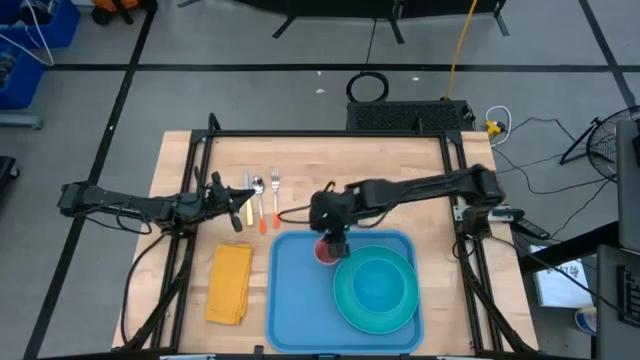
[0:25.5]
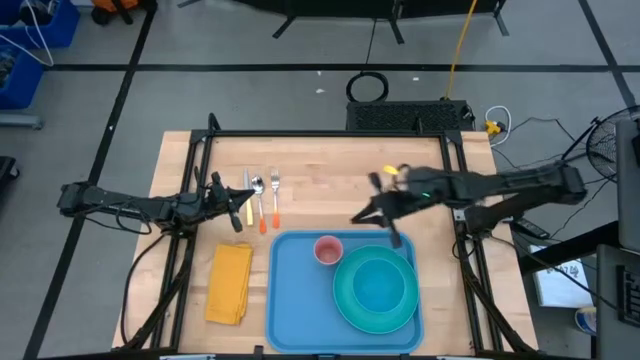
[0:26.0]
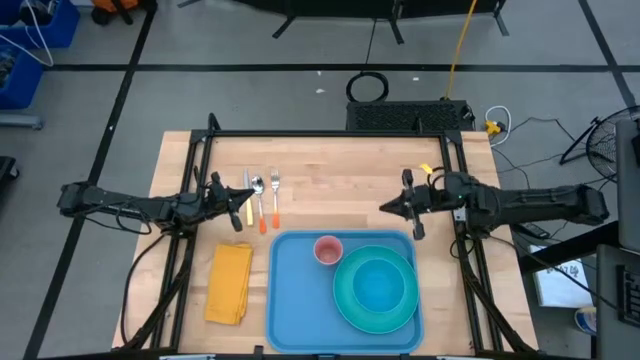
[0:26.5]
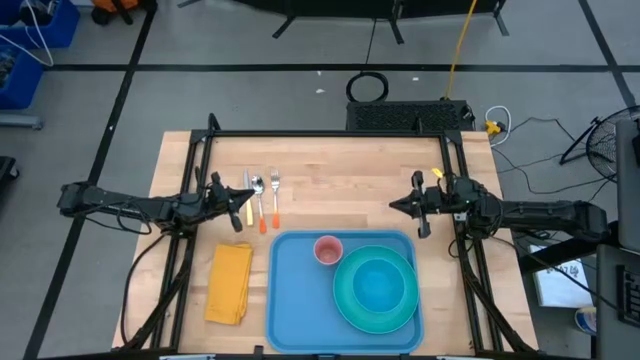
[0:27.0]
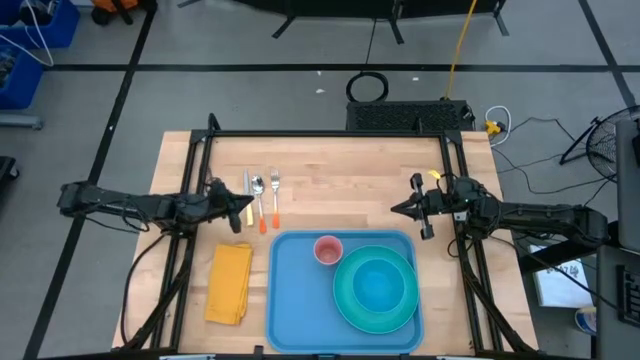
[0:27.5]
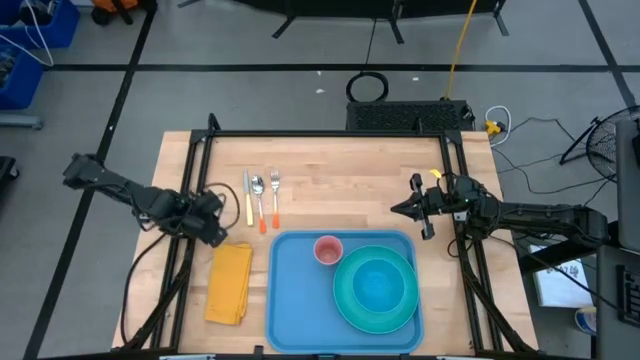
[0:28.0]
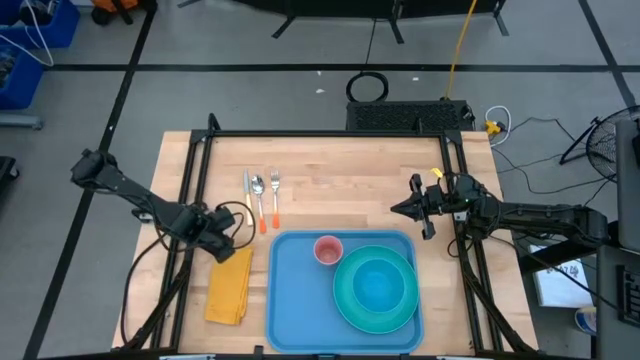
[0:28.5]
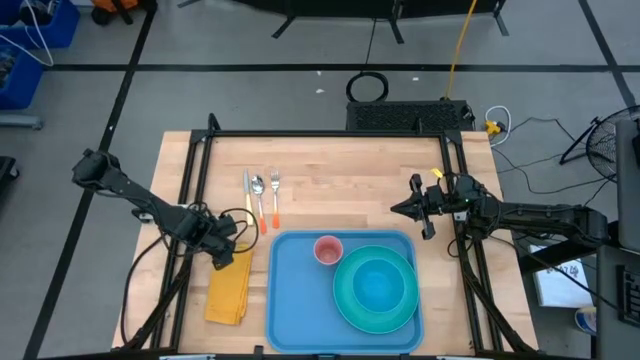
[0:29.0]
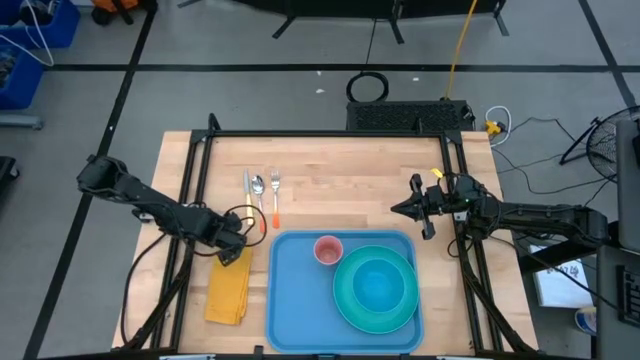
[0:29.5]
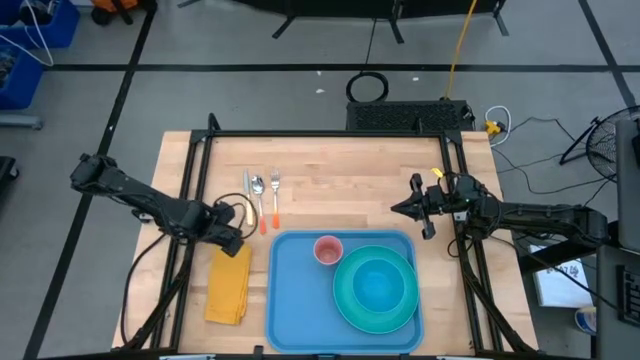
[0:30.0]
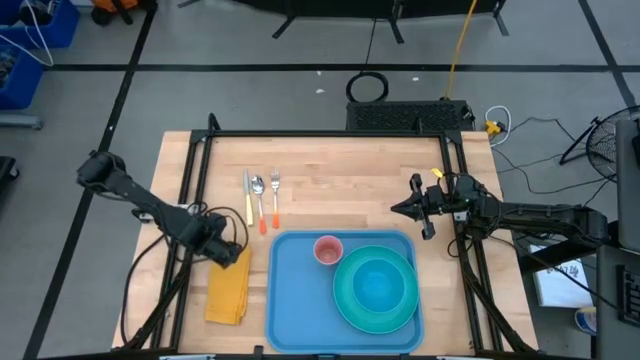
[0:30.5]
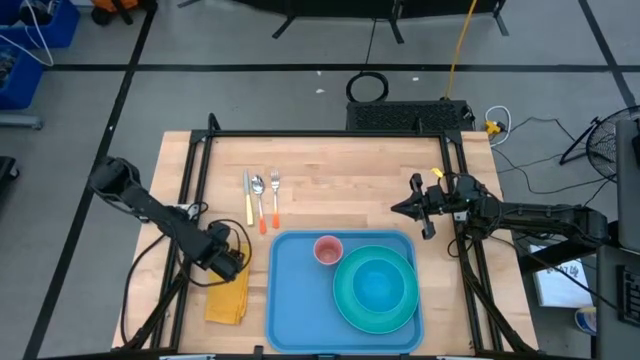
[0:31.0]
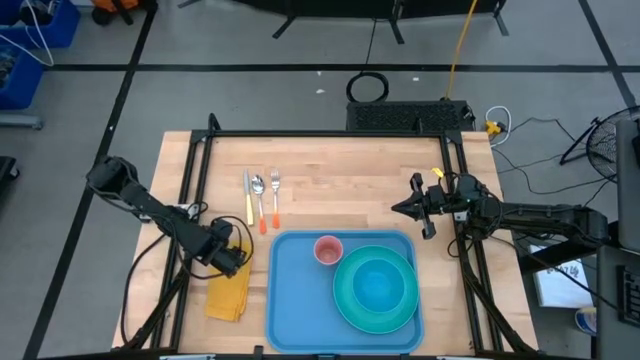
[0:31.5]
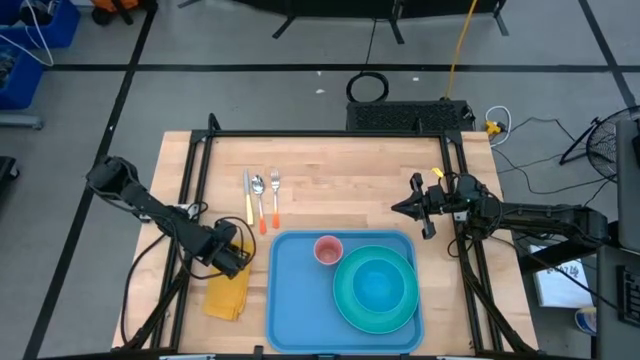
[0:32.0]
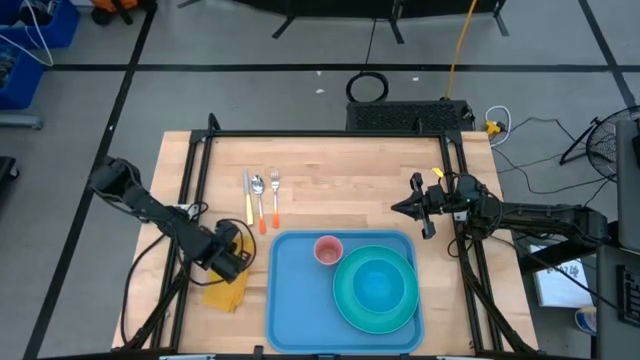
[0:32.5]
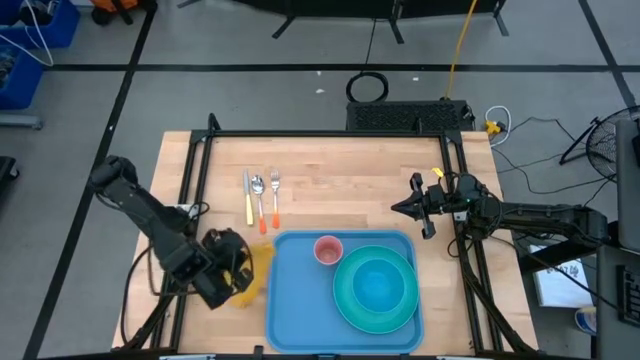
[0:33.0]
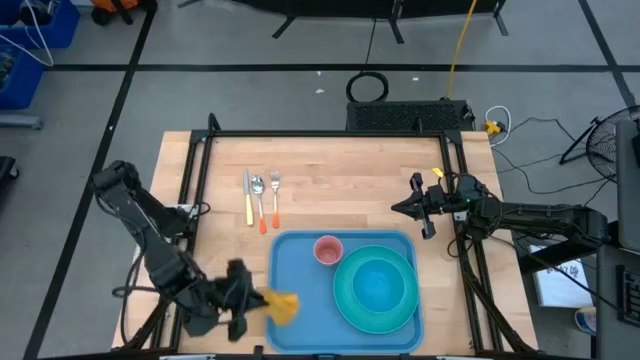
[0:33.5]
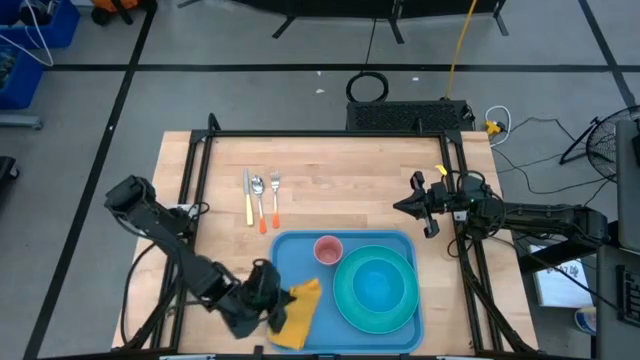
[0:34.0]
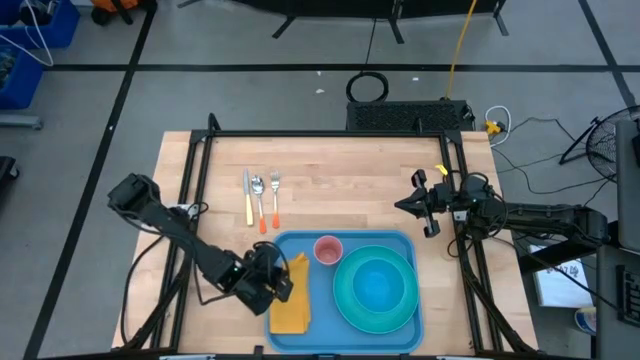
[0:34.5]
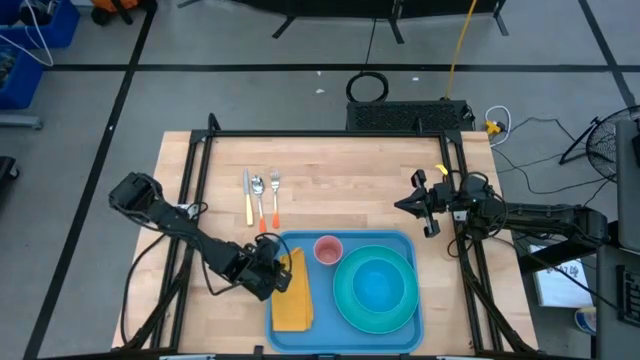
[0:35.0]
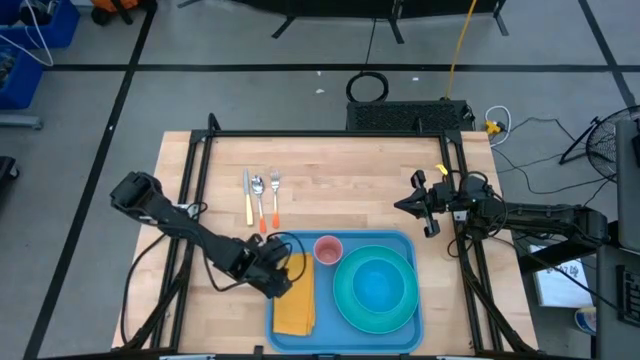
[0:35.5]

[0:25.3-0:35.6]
Task: Set up tray
Put the yellow napkin on the left side of the blue tray

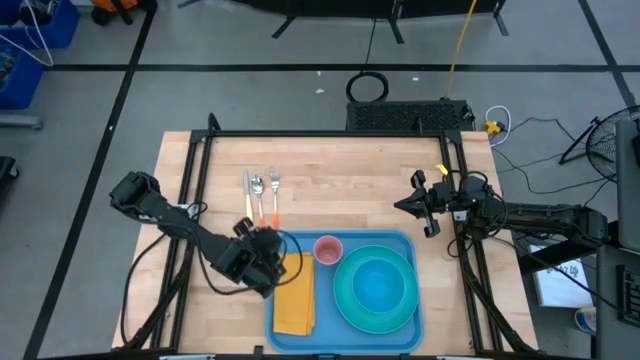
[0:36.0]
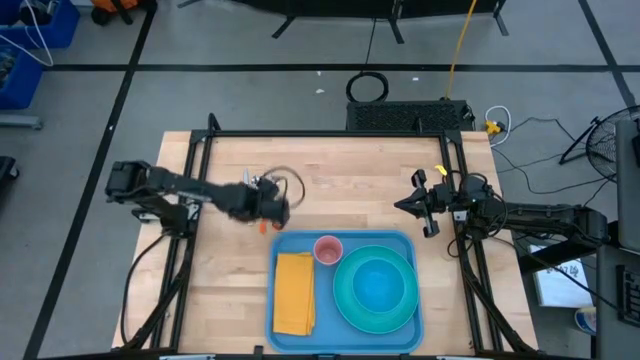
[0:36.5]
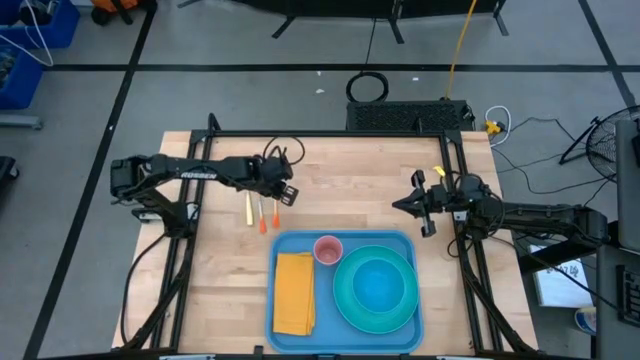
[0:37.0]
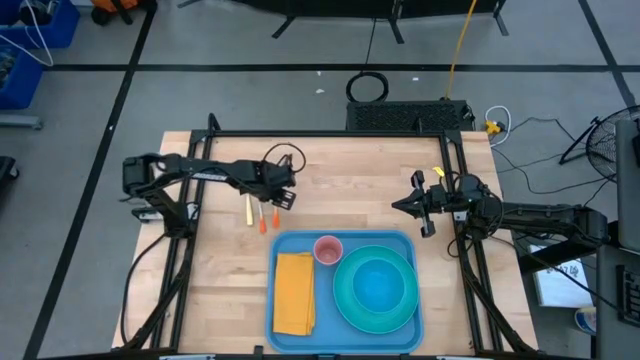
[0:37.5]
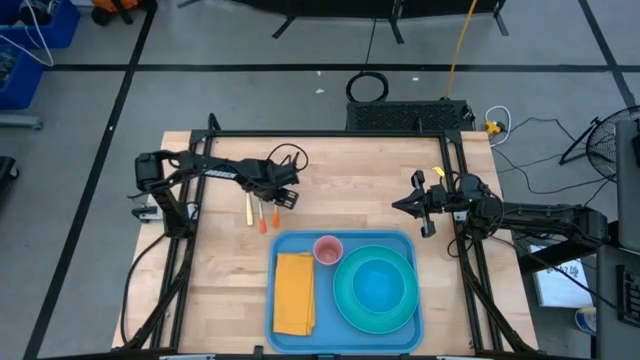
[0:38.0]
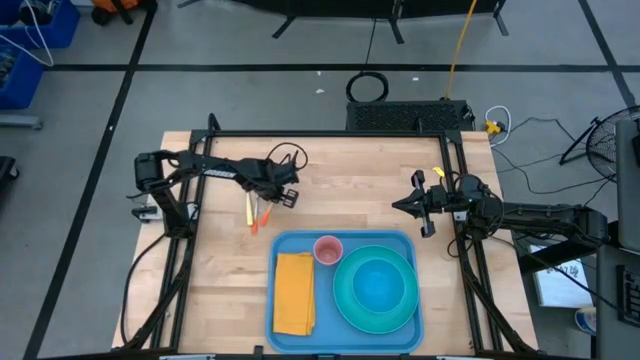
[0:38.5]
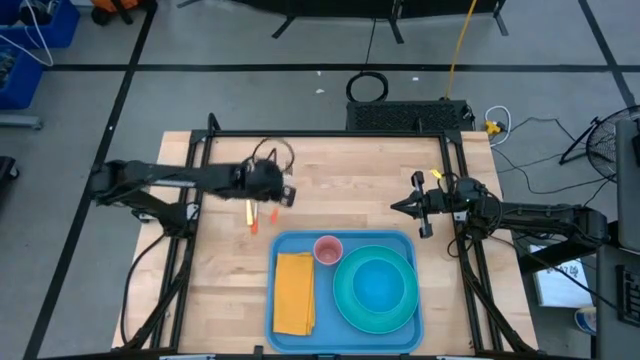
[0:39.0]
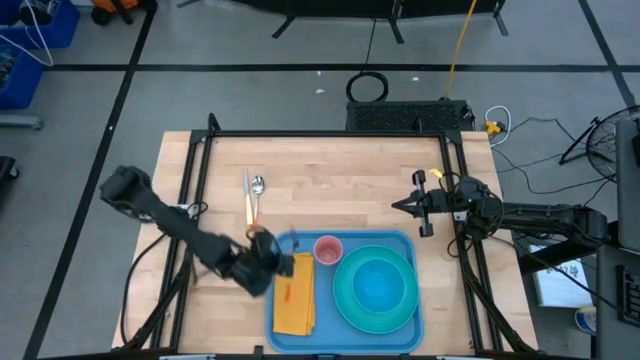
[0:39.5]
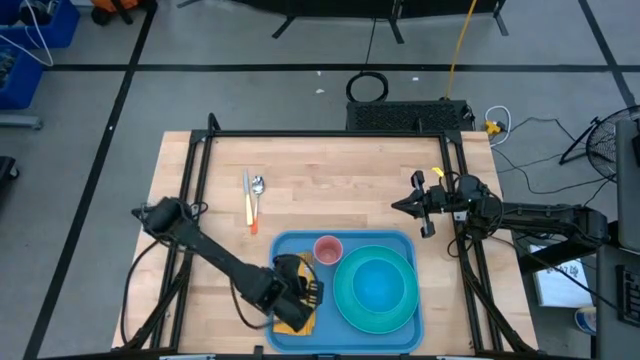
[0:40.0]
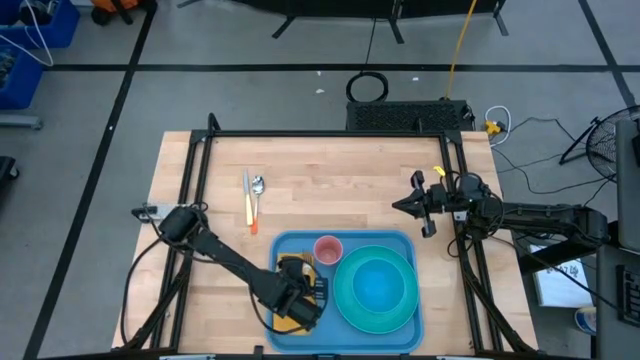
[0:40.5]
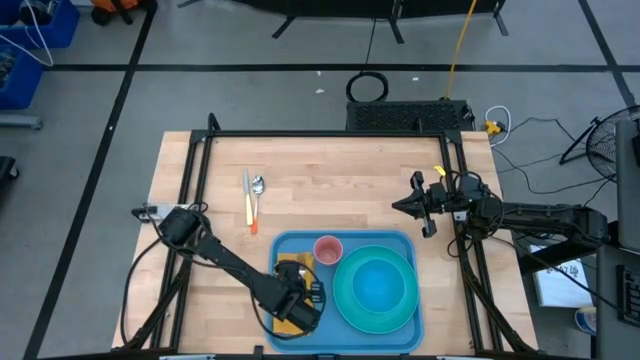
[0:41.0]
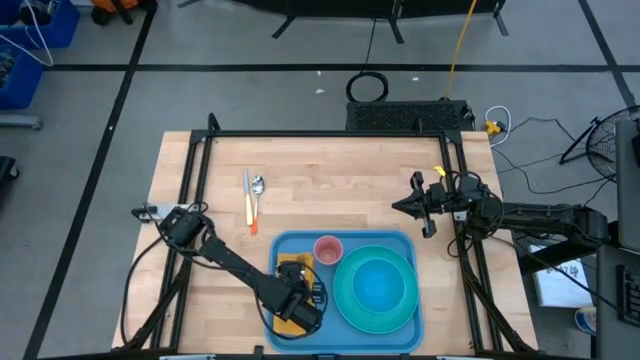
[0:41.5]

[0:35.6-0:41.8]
Put the orange fork on the yellow napkin on the blue tray

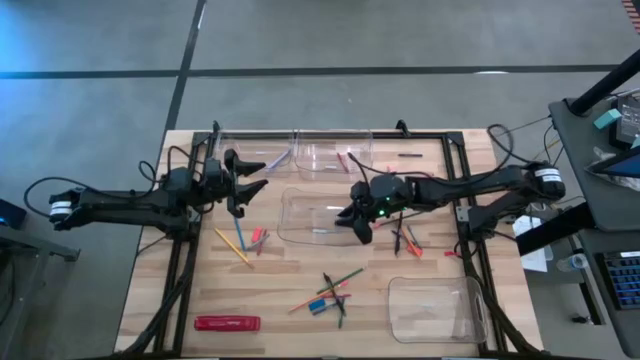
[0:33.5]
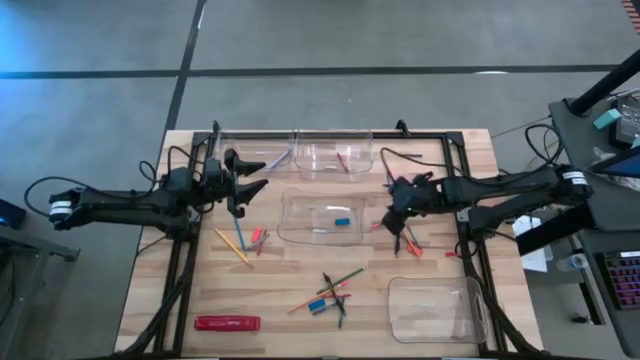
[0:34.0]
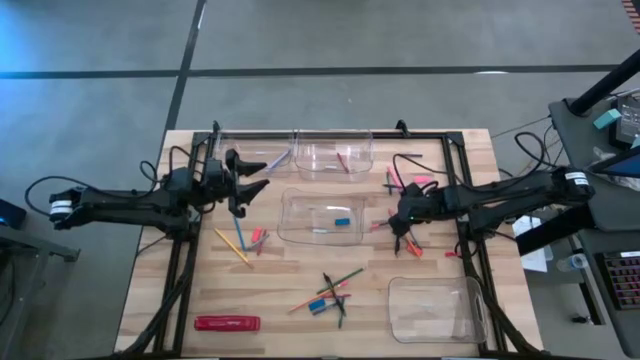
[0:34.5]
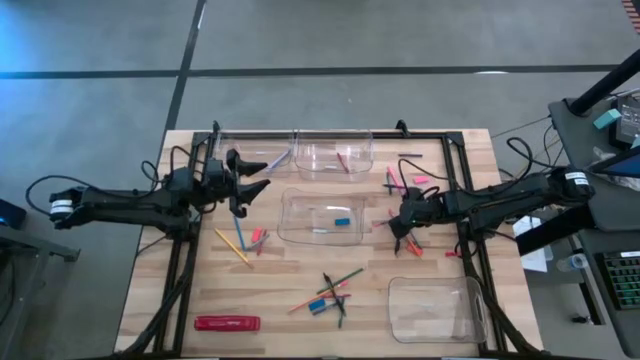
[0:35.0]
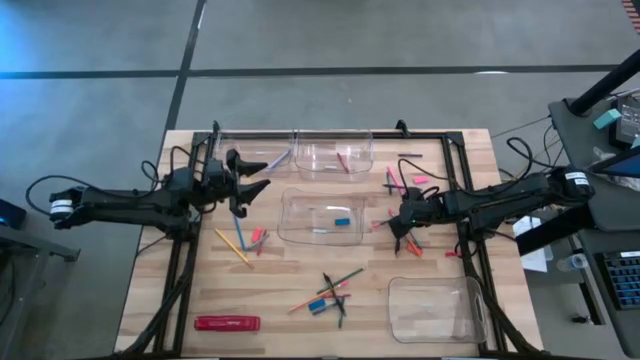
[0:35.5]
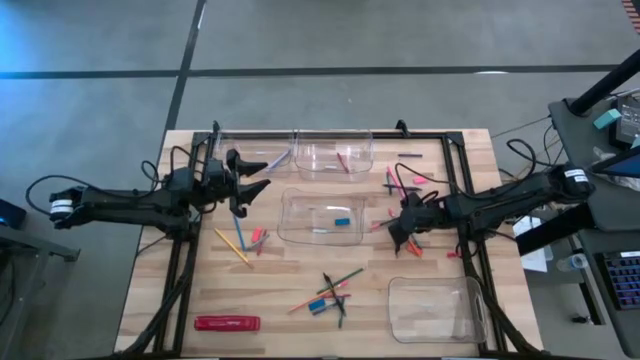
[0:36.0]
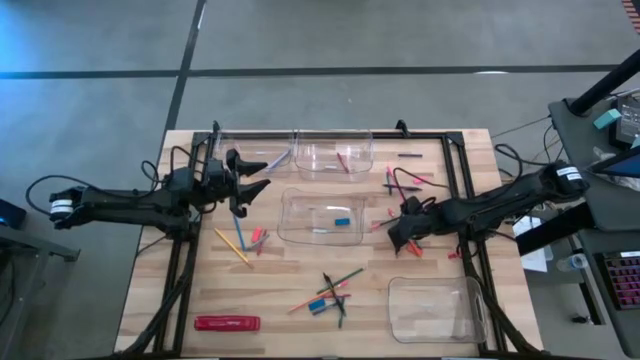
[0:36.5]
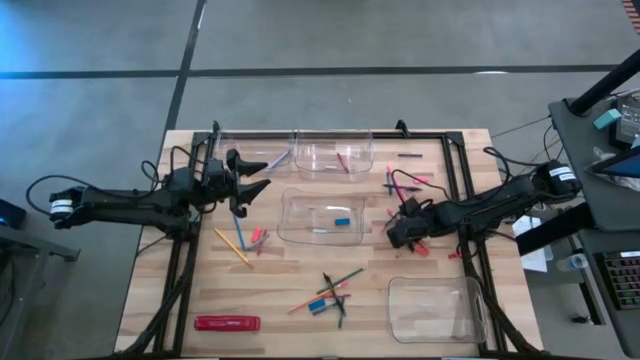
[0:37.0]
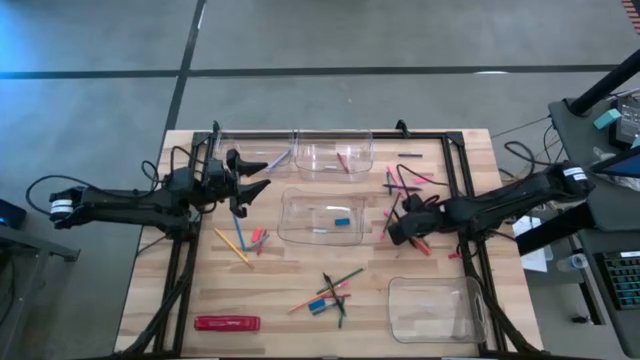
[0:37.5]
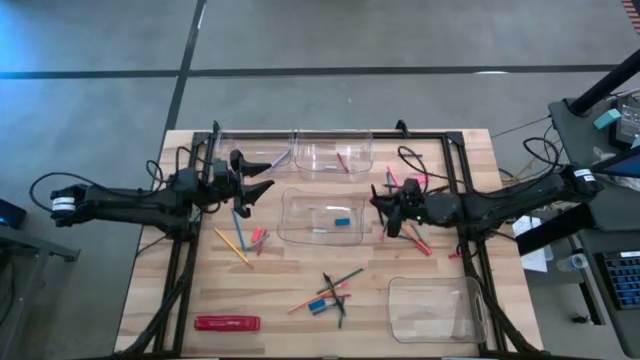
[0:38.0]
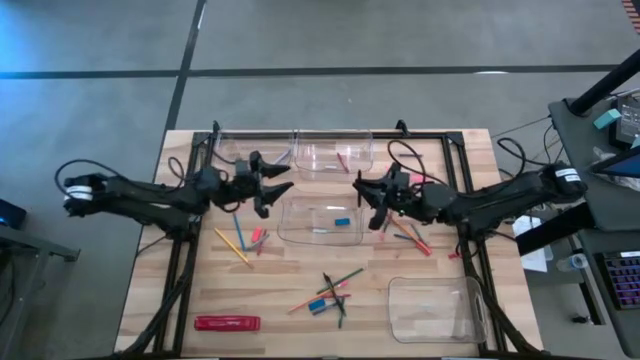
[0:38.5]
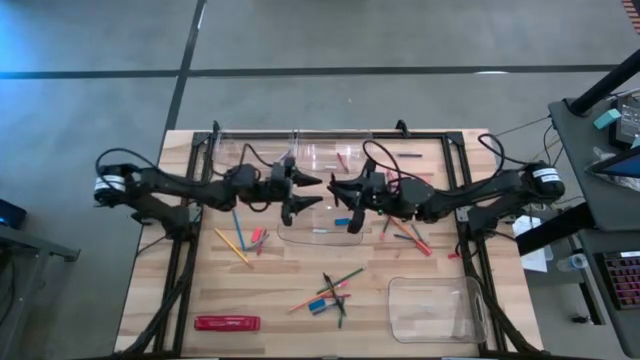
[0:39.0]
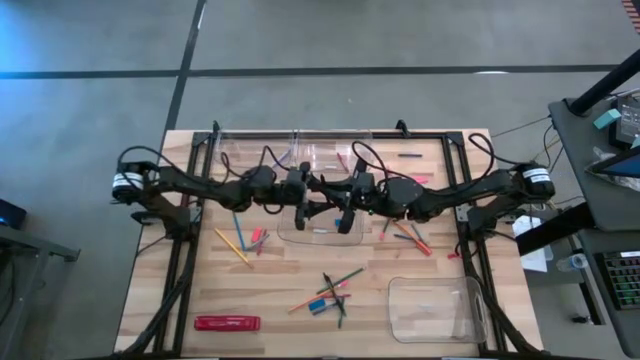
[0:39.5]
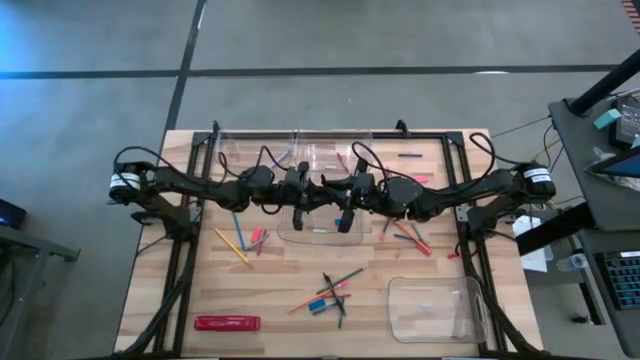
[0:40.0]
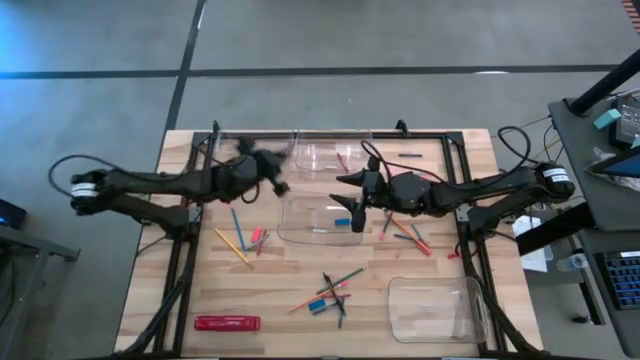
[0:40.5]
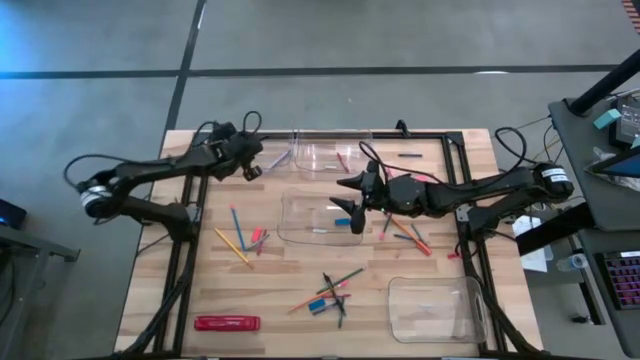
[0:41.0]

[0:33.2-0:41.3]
Task: Sort crayons/erasers/pens/pencils in bins
Put the black pen into the top left transparent bin
